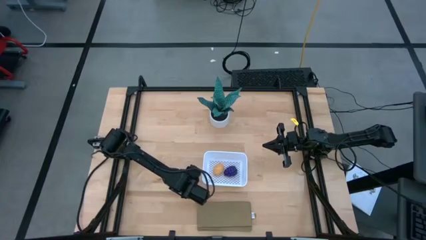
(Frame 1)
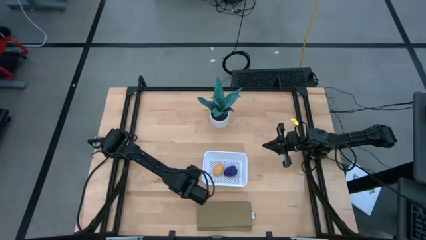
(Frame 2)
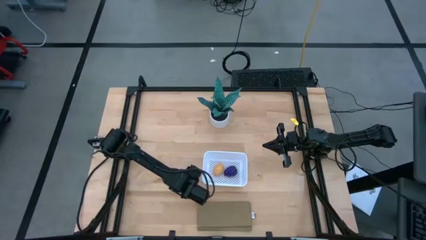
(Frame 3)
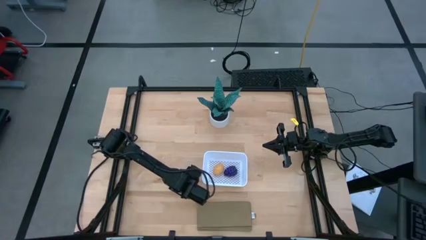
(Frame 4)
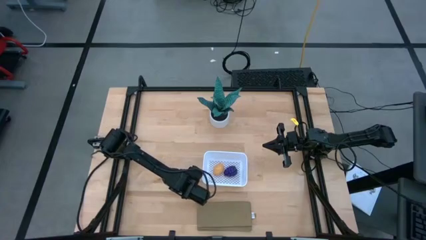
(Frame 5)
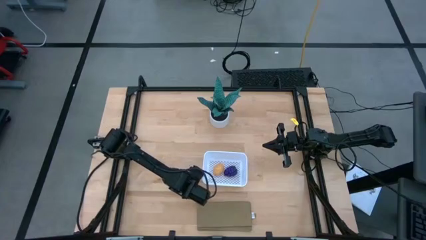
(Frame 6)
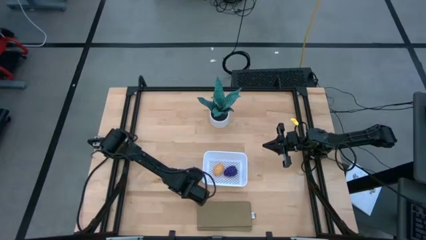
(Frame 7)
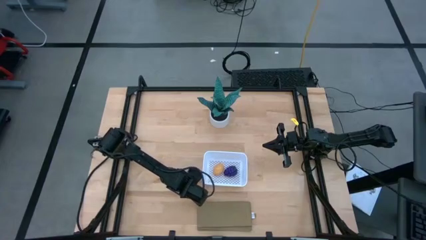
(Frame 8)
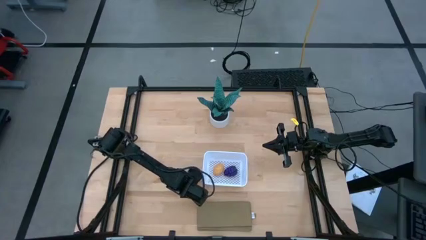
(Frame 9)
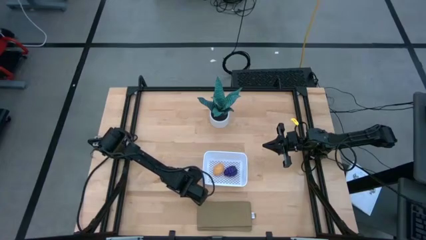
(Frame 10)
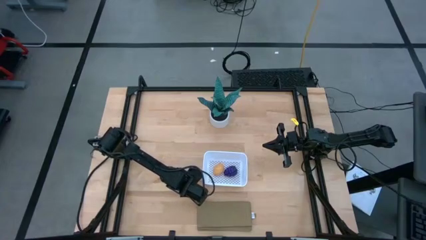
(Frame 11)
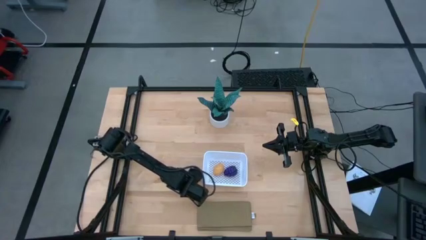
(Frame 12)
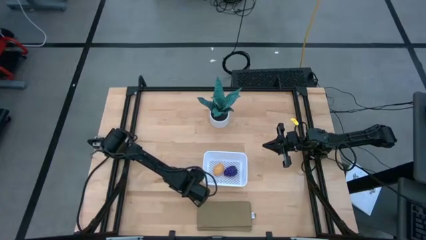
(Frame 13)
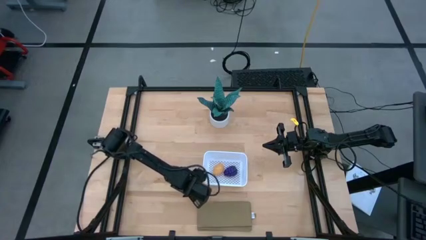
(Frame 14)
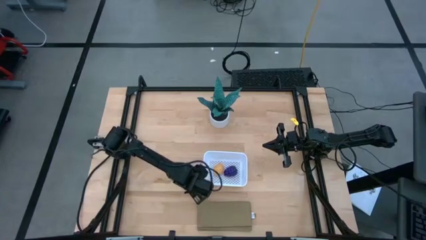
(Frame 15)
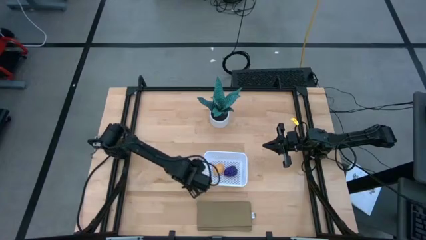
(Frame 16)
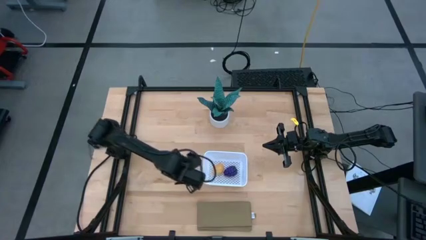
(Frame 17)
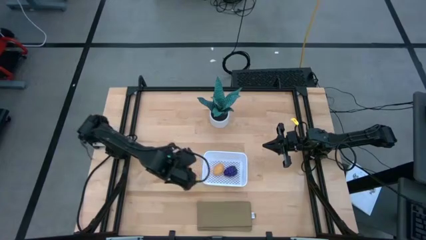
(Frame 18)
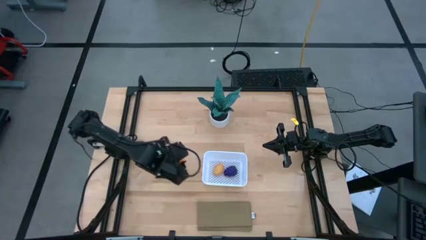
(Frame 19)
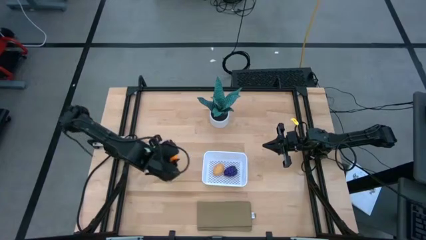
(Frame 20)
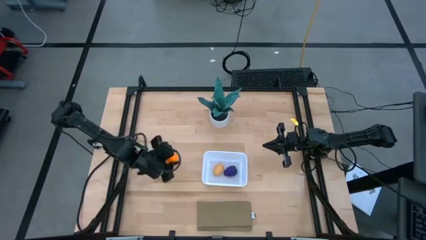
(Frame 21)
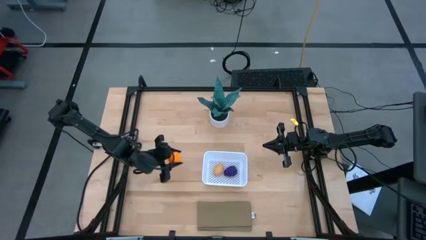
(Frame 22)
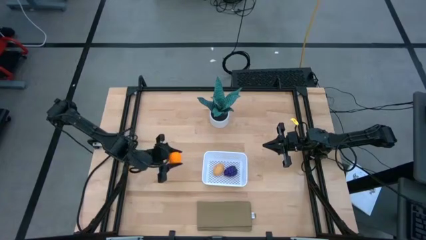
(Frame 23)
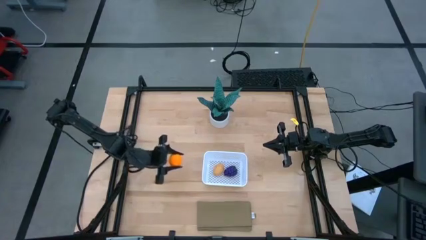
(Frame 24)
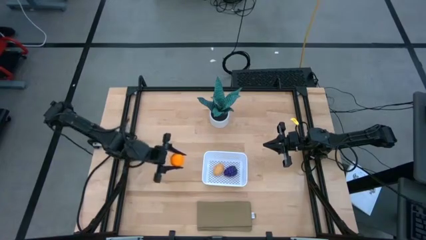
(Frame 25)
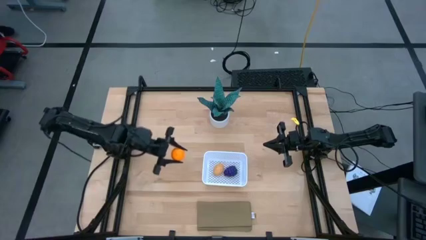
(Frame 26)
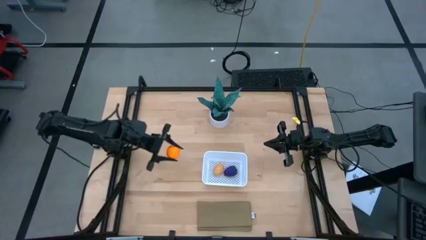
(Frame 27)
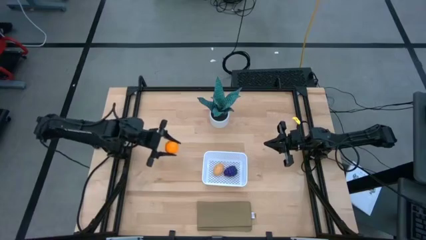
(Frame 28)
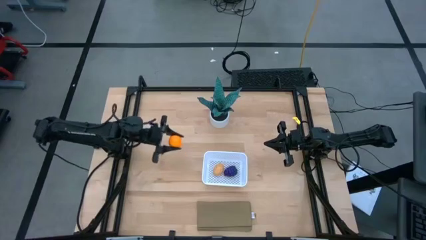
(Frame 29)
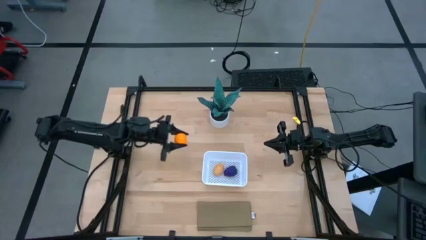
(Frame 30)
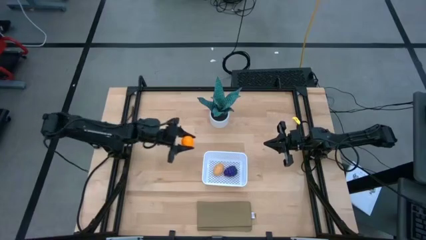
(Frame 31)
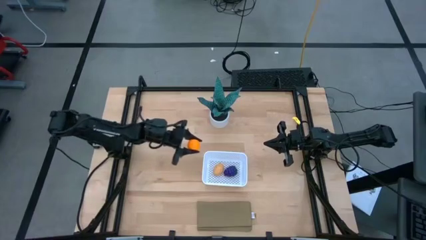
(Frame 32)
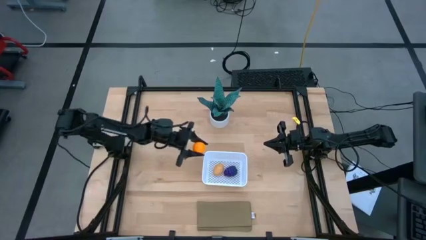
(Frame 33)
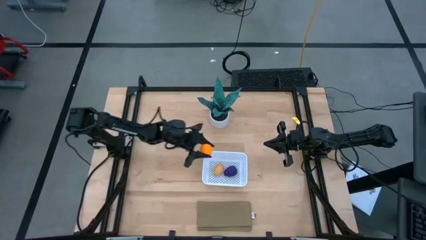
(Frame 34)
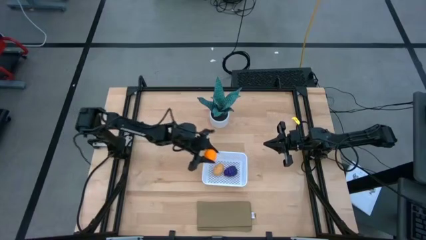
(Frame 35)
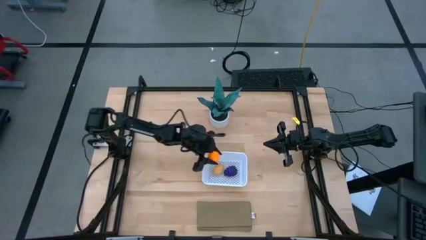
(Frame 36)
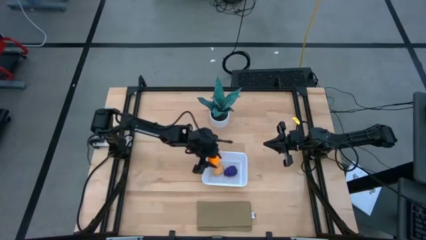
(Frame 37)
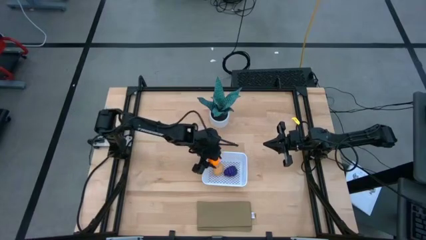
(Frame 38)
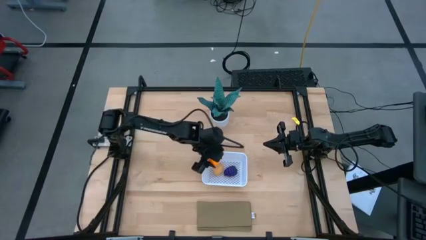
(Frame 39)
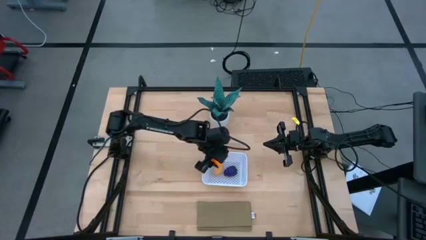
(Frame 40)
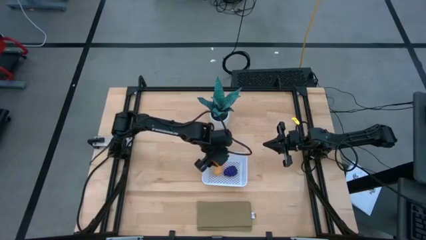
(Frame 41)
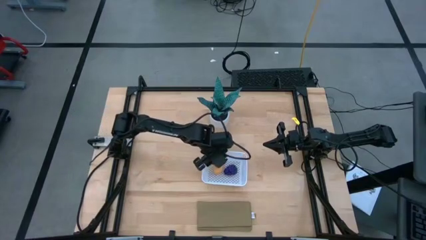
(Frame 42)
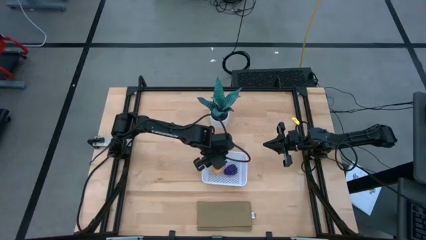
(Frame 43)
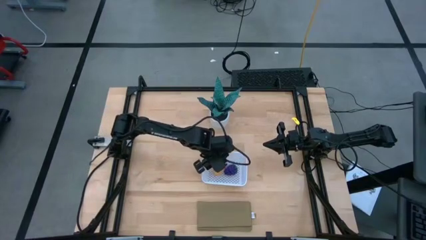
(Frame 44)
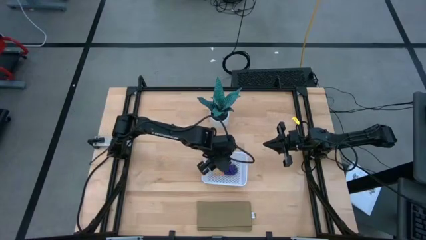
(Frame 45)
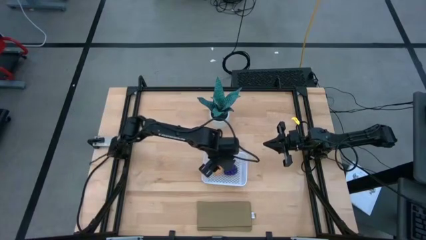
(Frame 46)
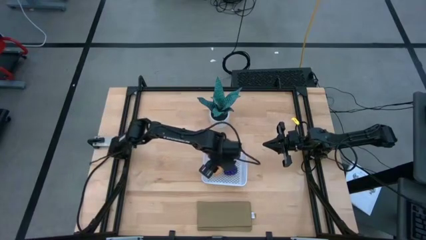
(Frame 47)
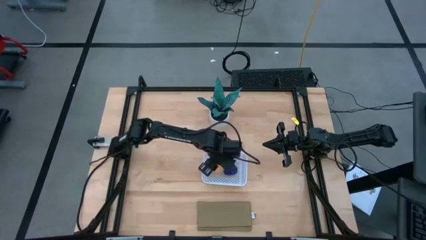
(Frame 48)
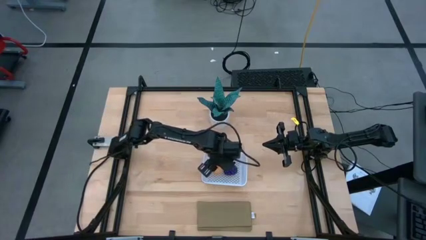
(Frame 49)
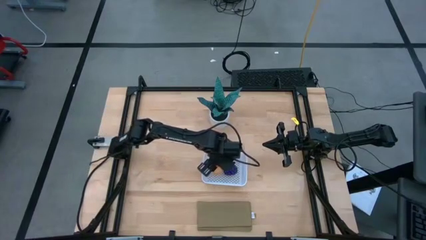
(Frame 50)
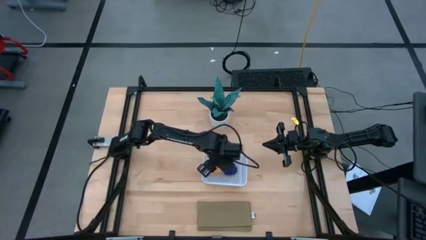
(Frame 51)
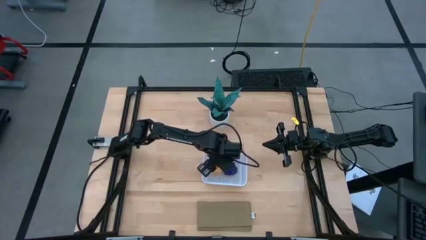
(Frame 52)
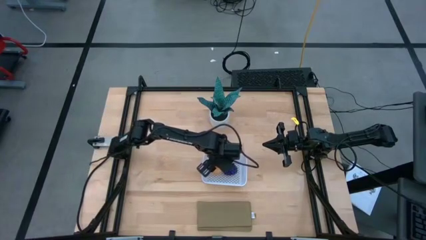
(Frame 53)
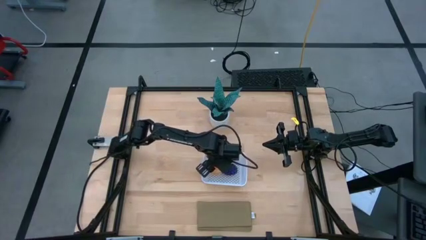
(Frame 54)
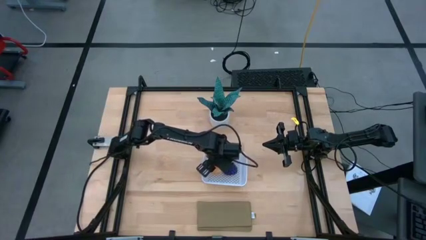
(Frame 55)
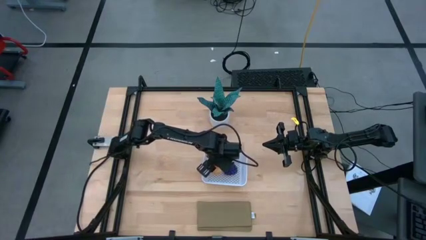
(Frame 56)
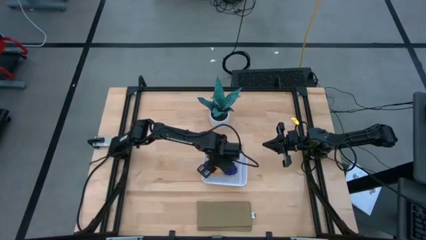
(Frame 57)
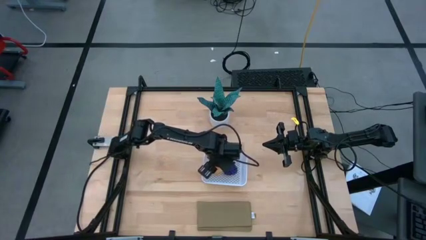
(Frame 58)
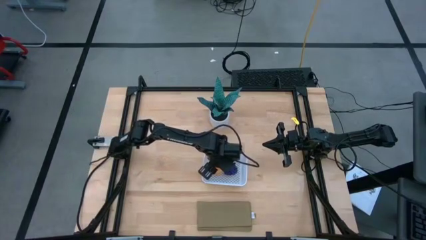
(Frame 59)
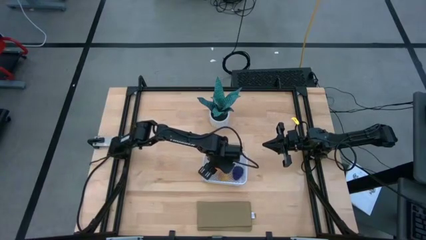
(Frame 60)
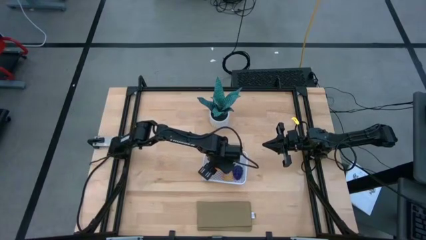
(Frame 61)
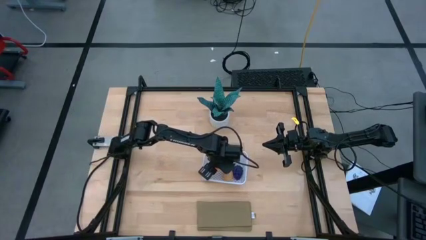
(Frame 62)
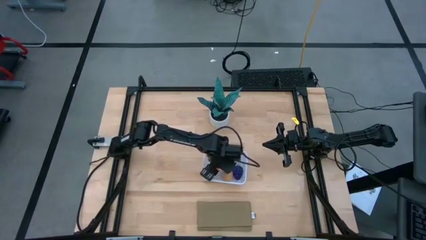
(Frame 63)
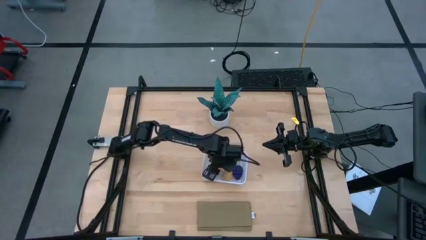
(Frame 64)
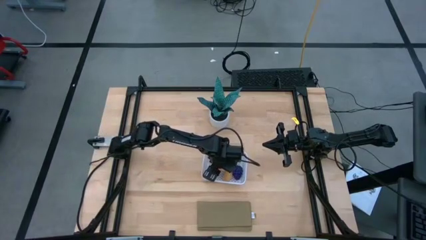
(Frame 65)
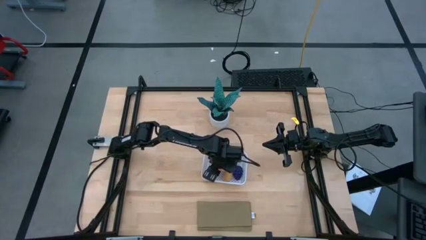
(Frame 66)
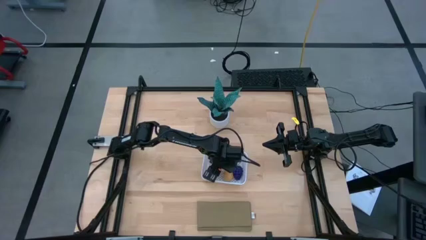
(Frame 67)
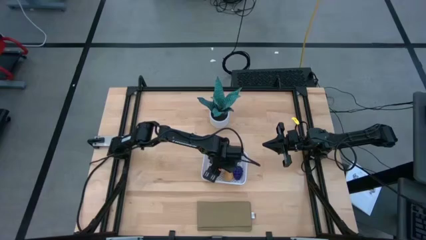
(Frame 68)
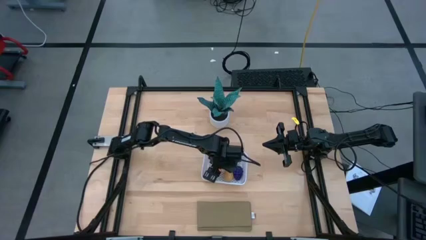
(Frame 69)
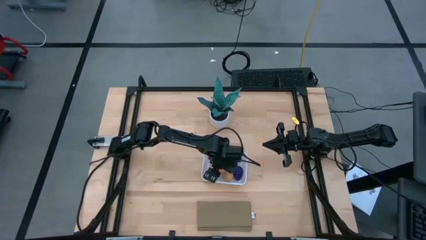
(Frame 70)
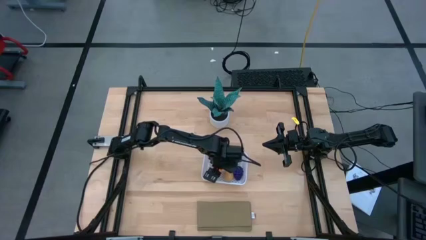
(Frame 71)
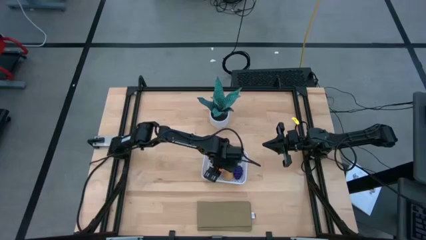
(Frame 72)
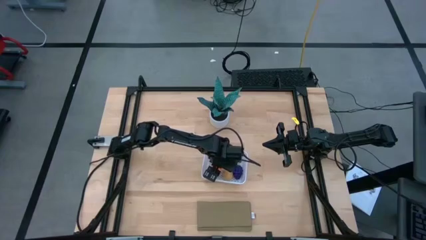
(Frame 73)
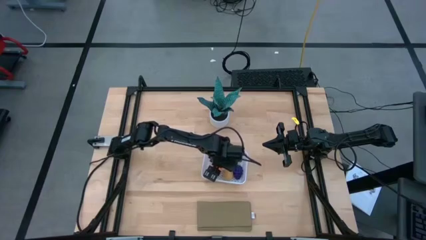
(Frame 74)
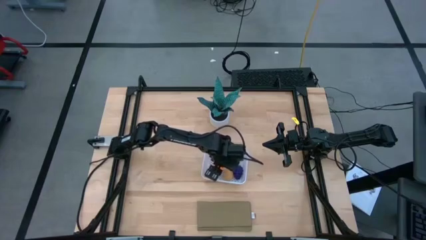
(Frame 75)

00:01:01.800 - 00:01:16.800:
Task: Pick and placing Produce into tupperware
Put the orange into the white basket
